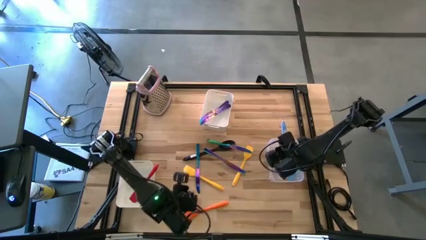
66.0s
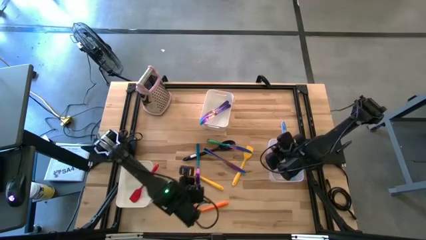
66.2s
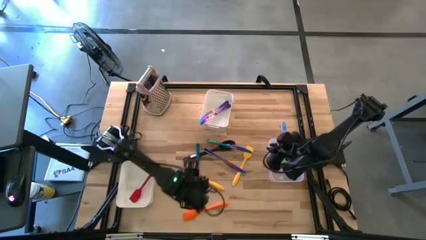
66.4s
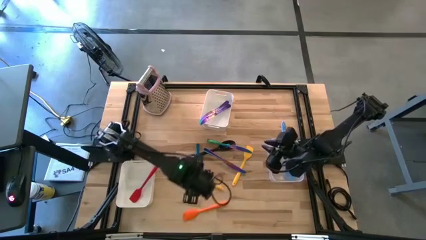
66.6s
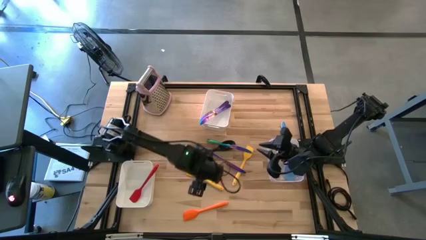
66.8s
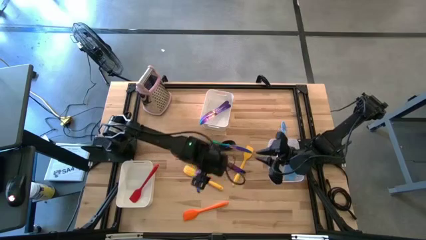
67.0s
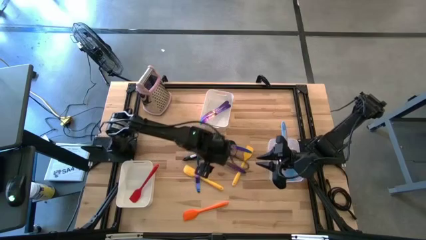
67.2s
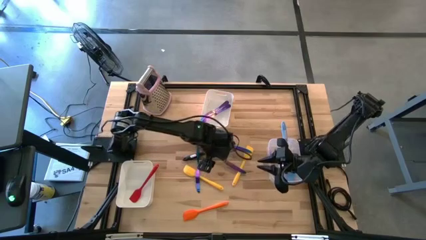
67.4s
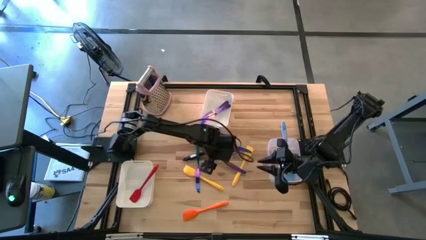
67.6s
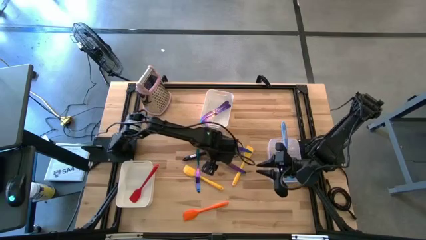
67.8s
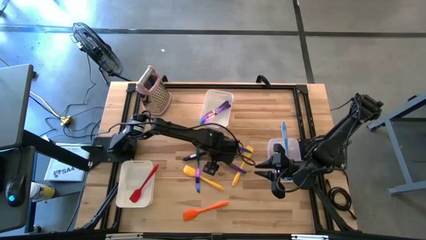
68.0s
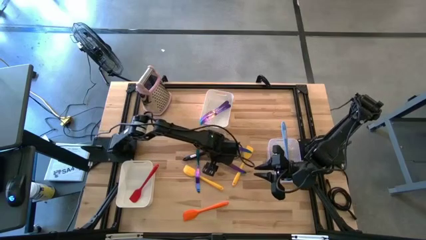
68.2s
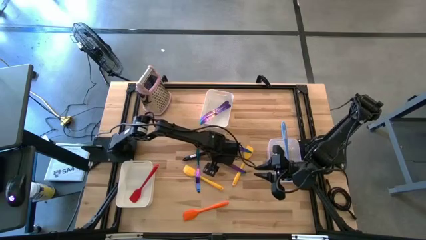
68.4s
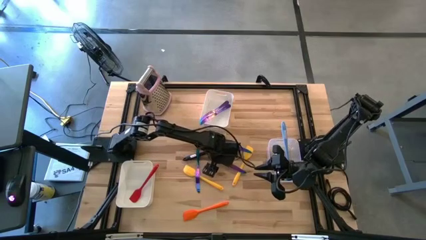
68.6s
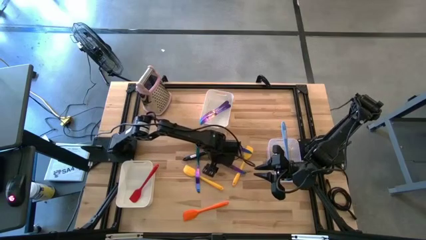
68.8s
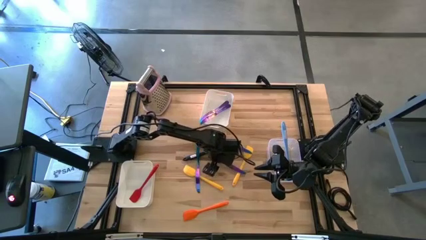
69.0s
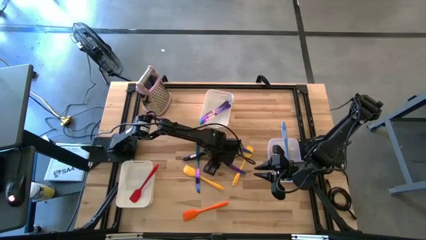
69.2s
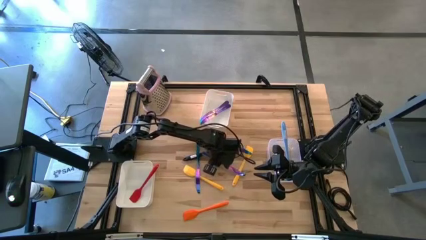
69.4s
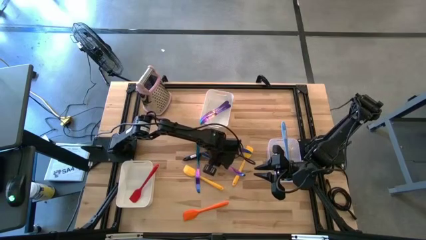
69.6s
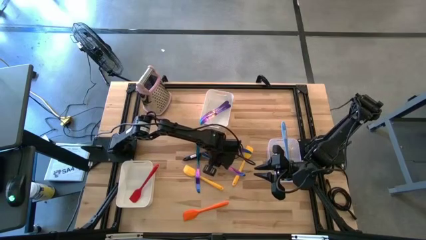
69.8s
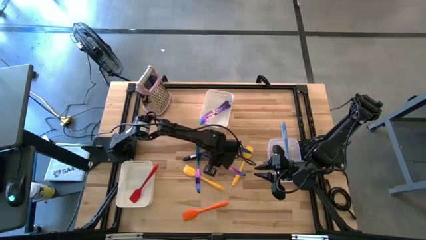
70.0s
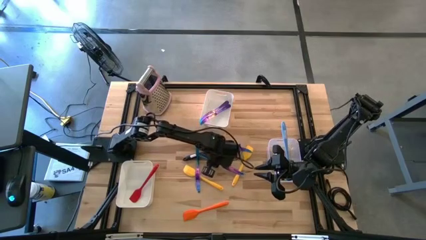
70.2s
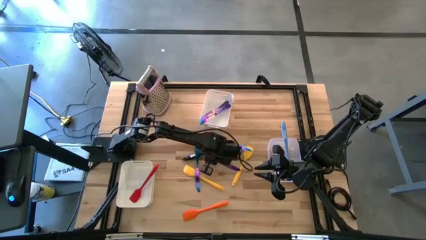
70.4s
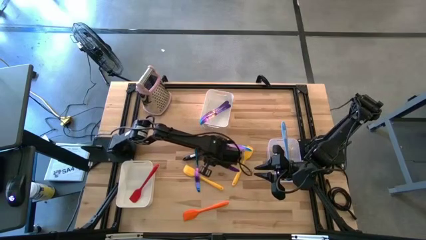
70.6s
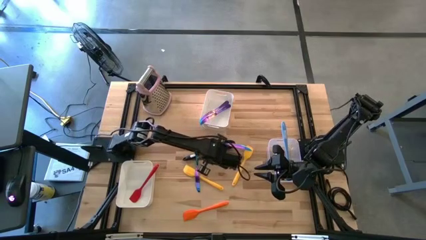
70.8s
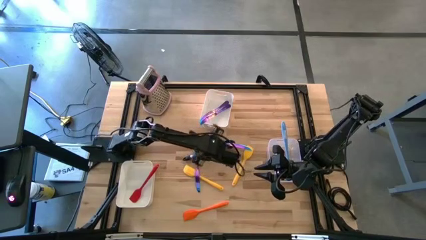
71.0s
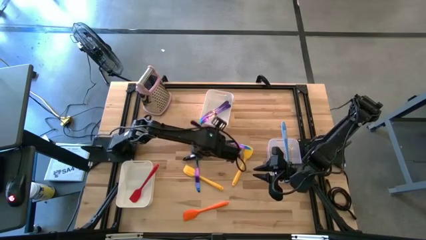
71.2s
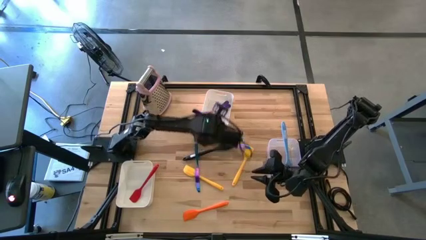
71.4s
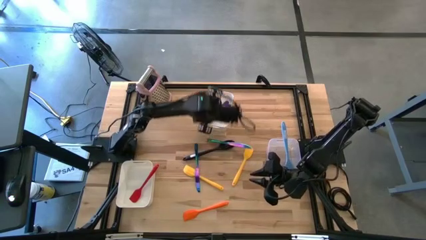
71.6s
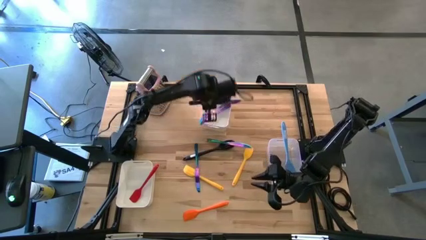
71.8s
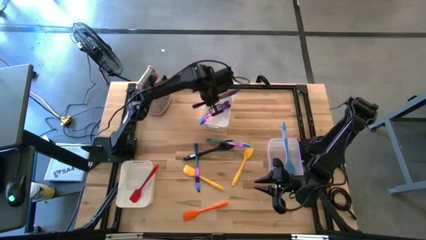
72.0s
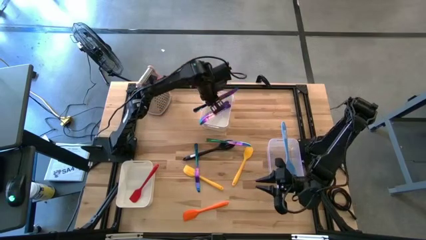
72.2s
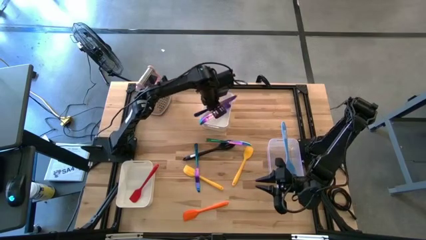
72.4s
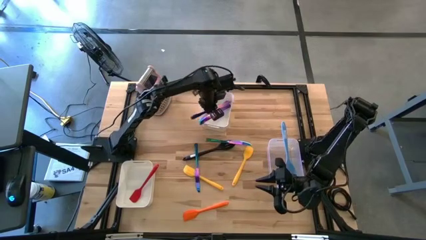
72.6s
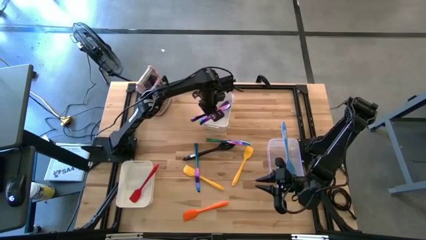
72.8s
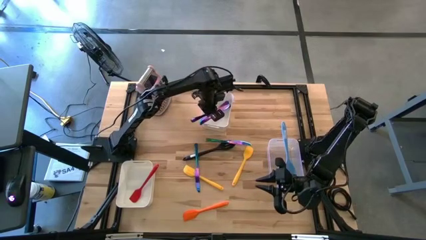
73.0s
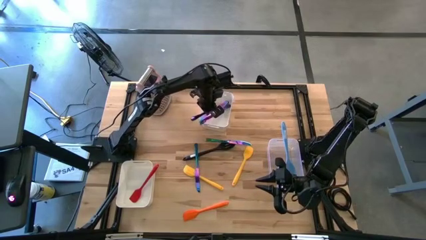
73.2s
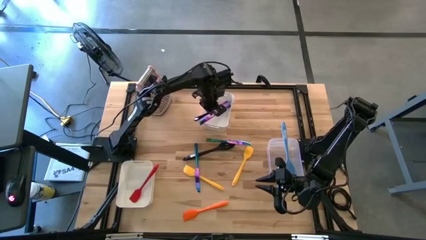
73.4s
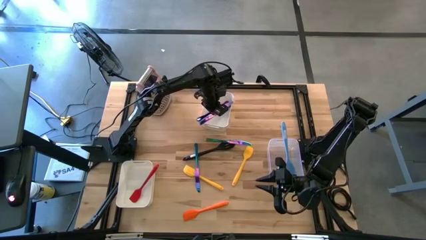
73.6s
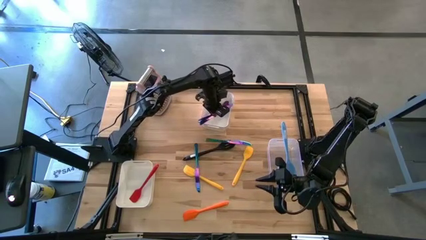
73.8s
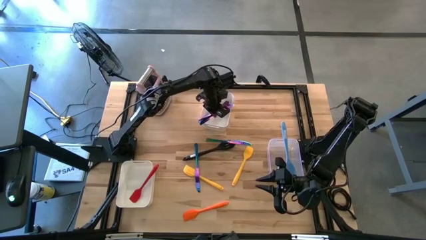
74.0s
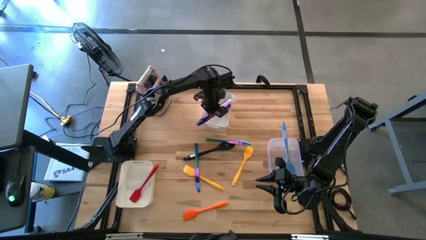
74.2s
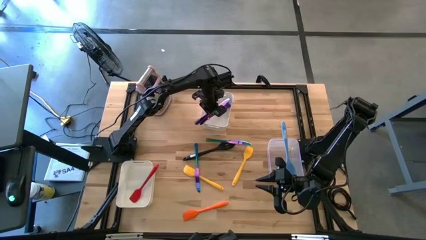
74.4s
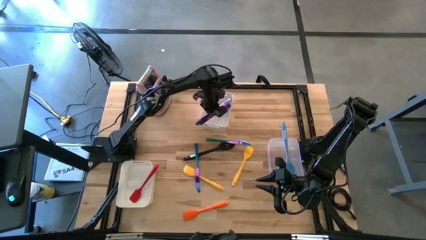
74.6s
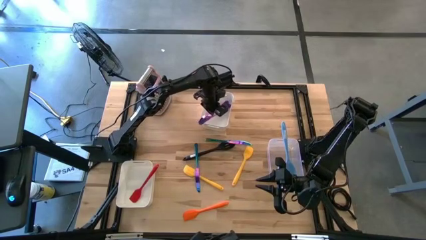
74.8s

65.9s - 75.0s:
Task: Pick & Place Kitchen Items
Put the blue table knife into the top white bin

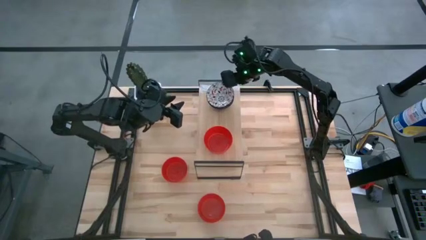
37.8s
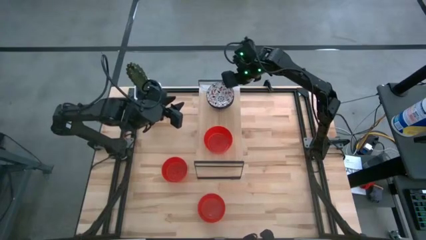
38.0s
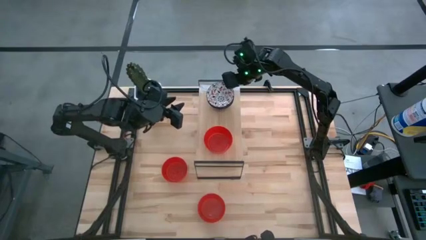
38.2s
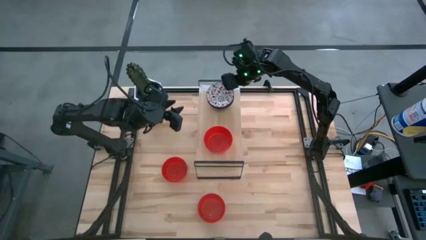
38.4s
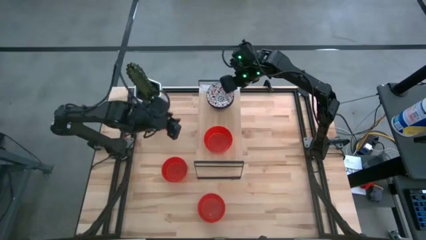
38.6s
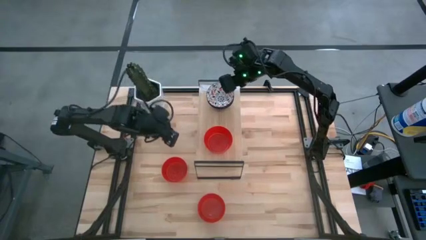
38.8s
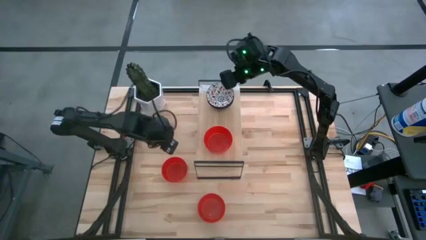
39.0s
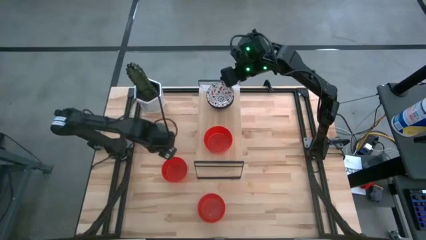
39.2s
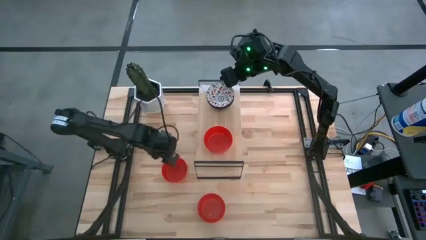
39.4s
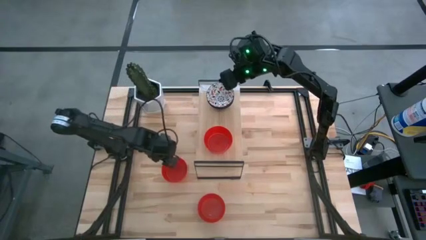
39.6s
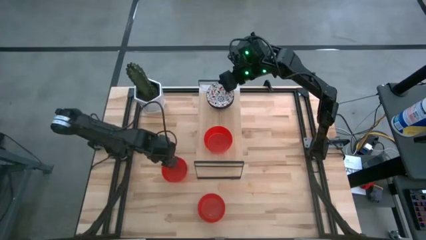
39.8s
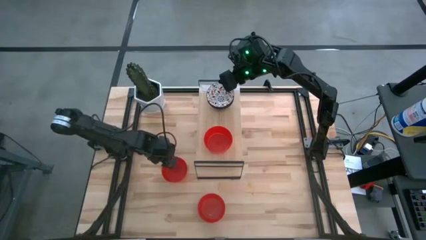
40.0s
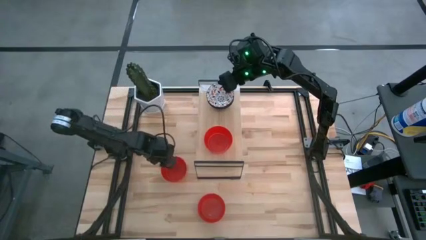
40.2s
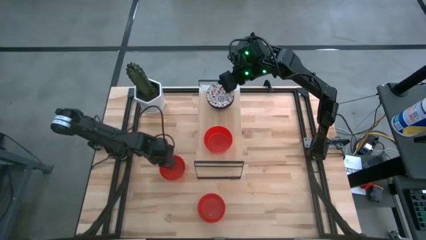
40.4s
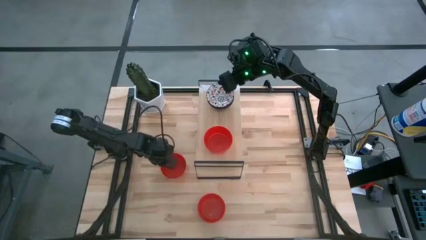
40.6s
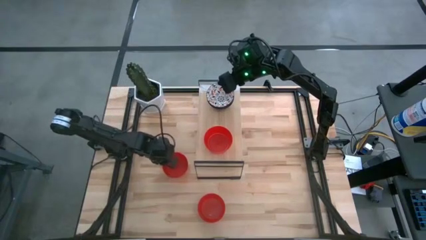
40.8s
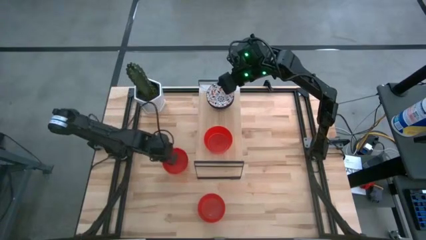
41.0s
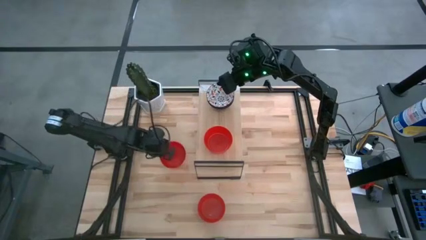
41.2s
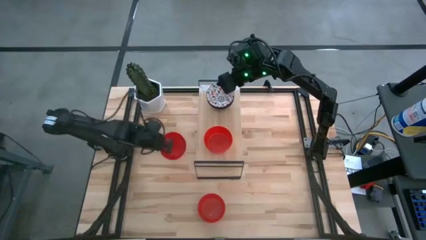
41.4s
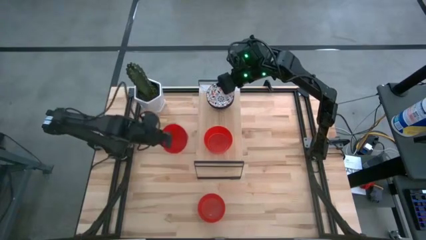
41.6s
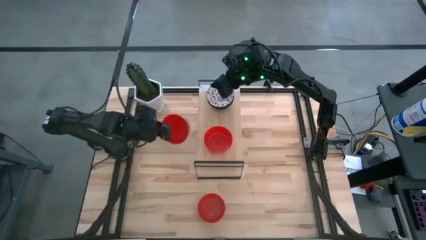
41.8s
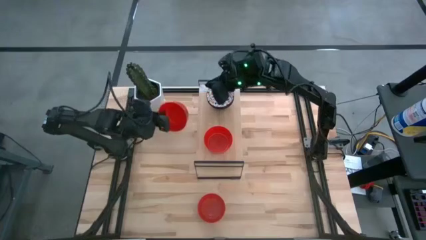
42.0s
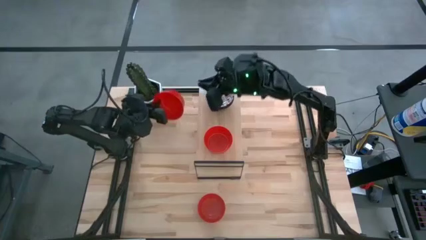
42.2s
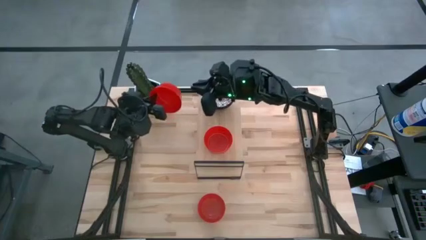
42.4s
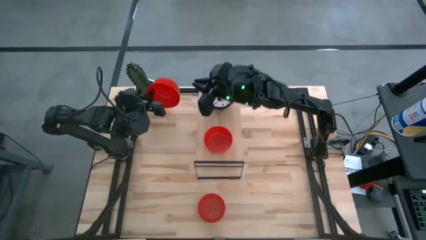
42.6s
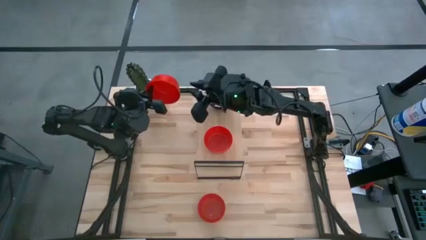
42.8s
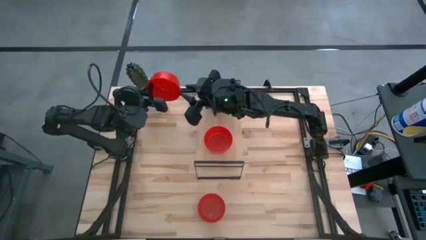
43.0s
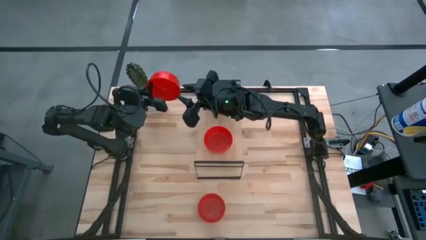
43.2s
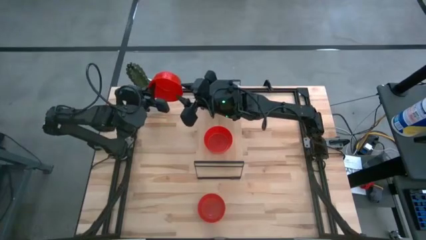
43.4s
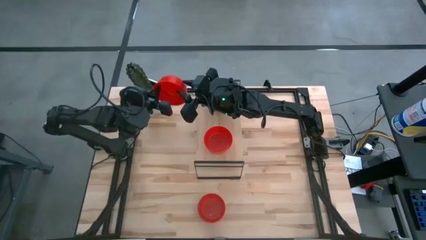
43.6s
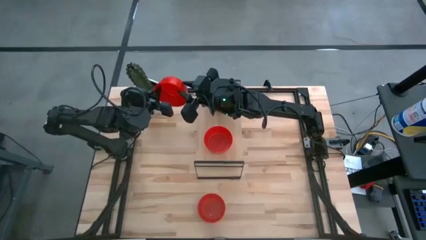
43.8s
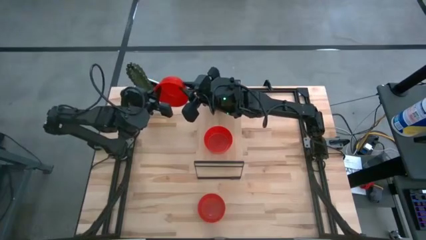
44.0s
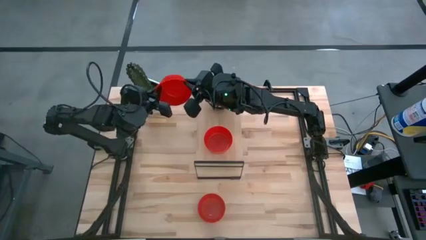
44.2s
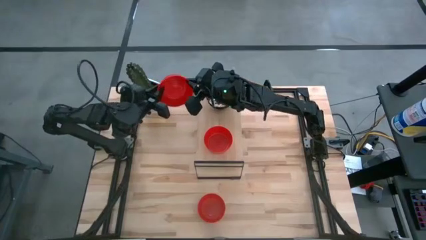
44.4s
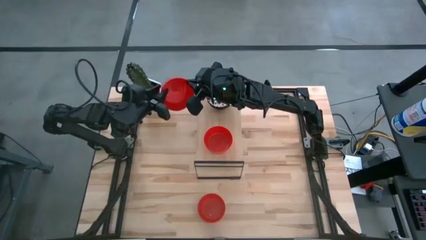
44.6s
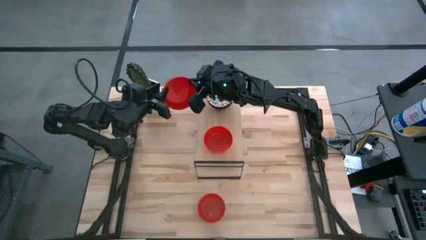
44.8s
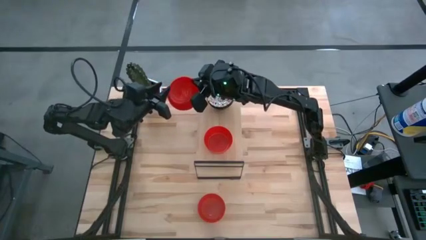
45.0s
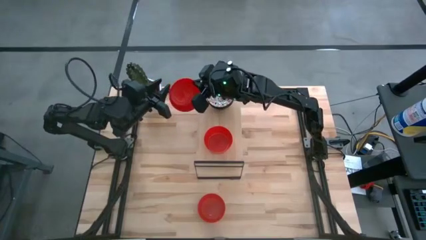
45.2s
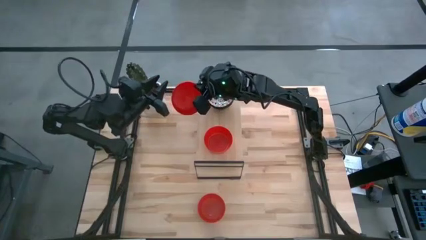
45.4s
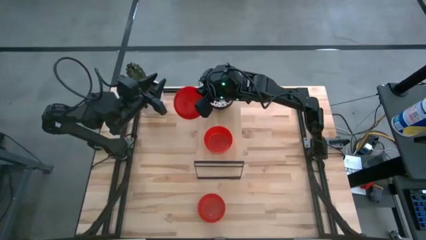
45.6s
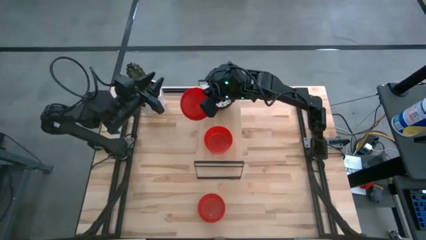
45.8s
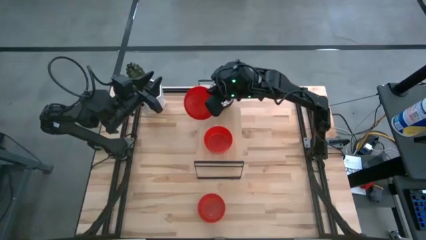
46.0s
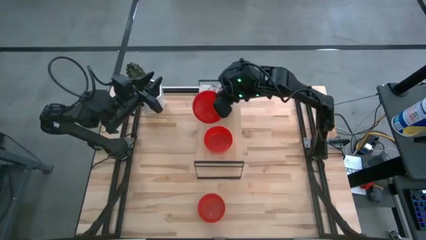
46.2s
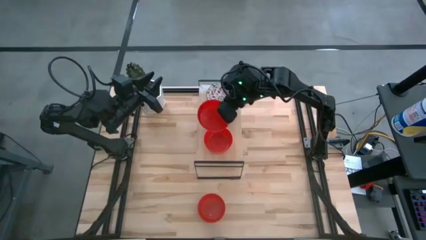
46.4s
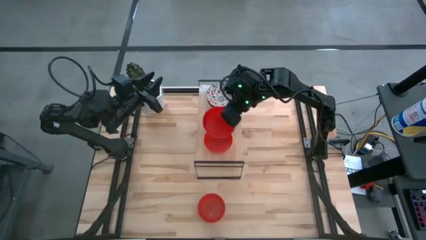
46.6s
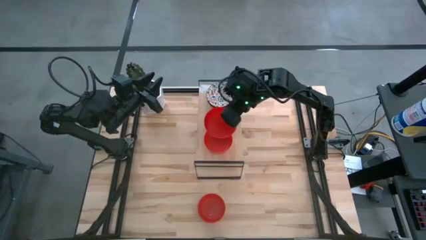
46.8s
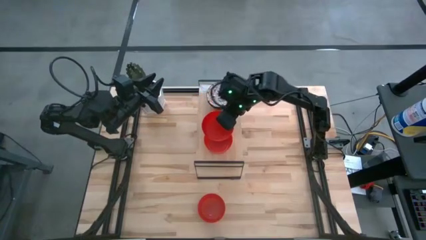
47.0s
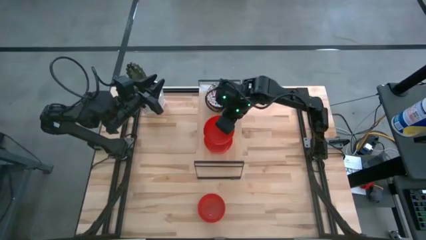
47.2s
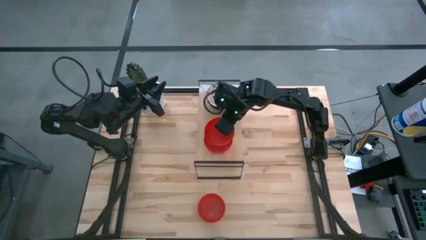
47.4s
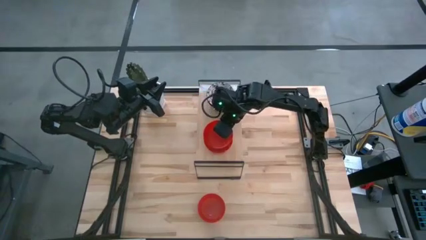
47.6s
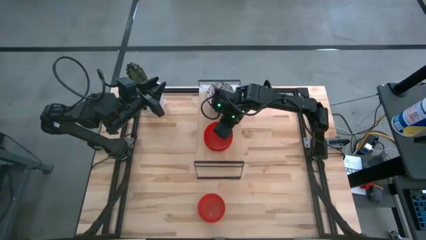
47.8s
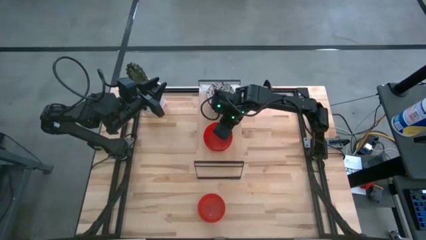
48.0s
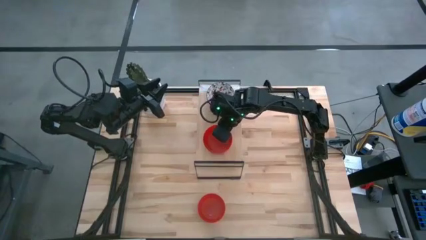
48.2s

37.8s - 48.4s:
Task: Pick & Place Mini bowls
Stack the top red bowl on top of the other red bowl on the shelf
